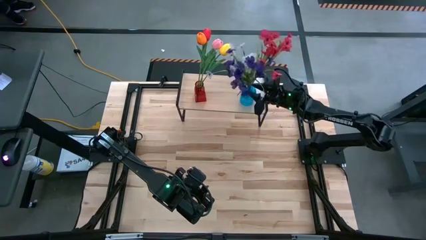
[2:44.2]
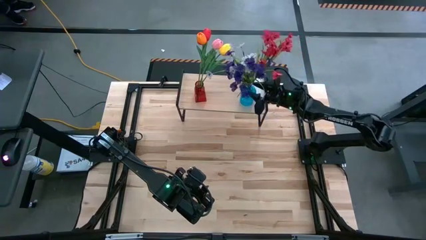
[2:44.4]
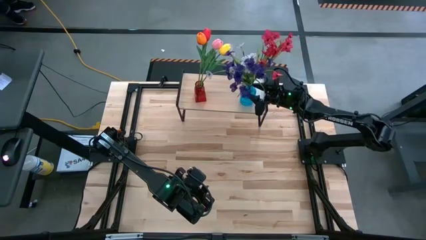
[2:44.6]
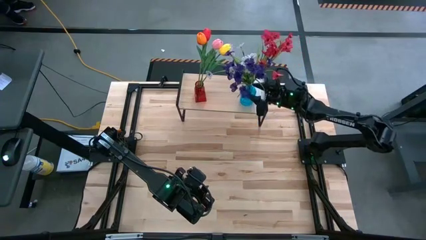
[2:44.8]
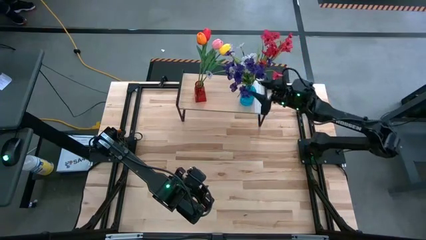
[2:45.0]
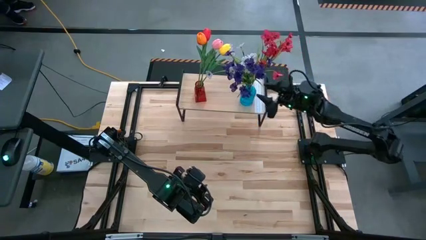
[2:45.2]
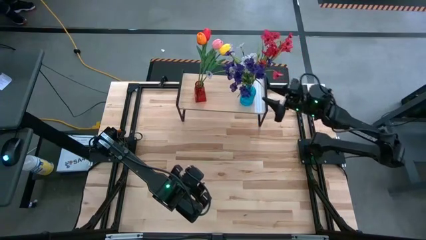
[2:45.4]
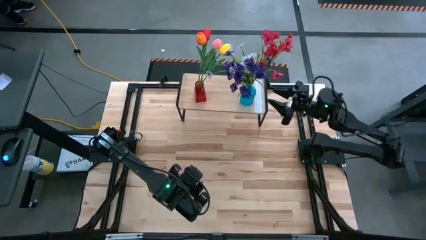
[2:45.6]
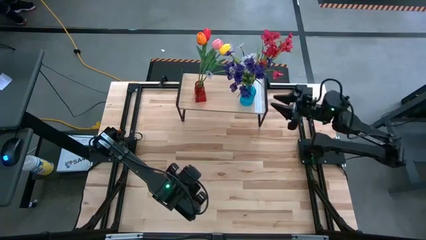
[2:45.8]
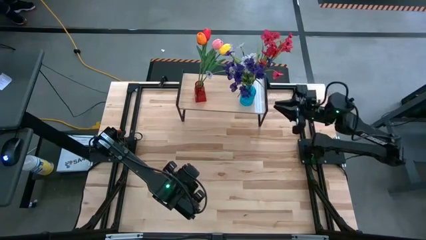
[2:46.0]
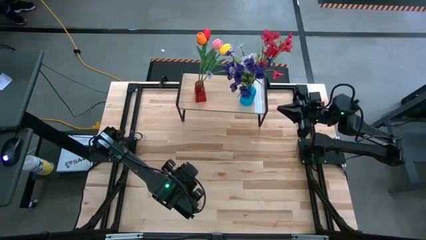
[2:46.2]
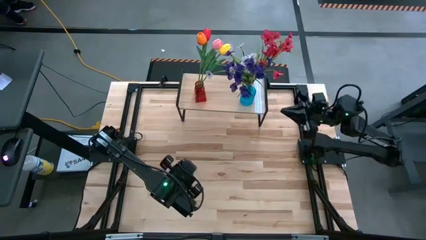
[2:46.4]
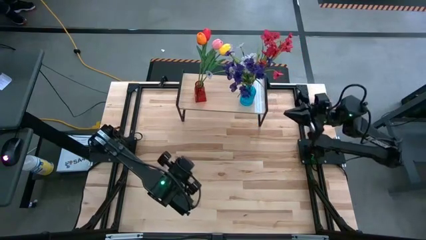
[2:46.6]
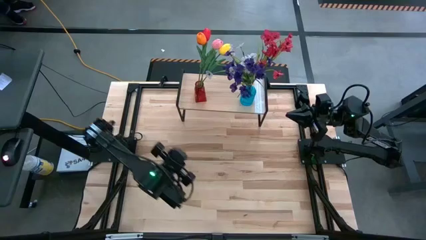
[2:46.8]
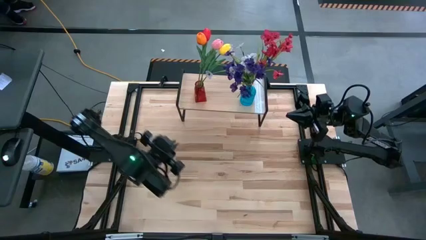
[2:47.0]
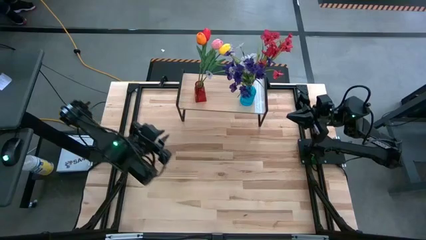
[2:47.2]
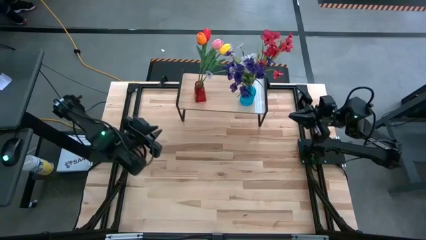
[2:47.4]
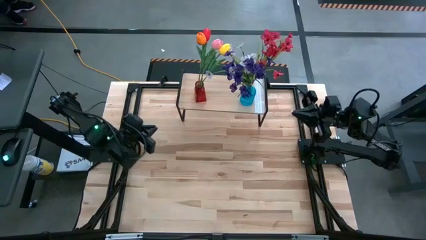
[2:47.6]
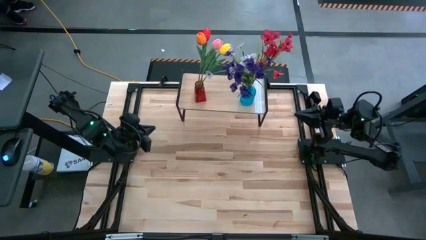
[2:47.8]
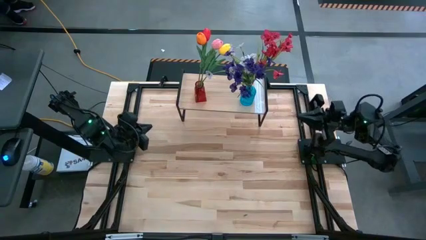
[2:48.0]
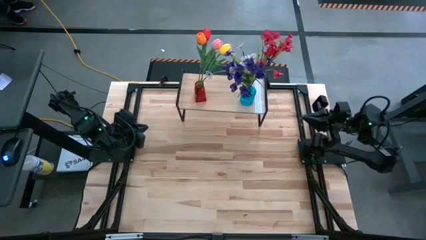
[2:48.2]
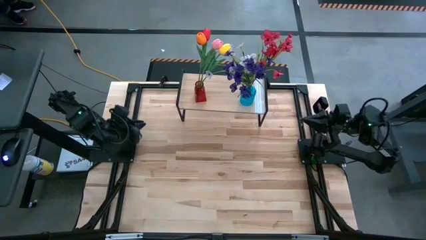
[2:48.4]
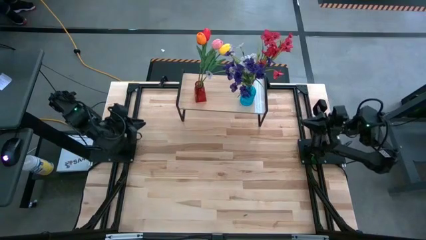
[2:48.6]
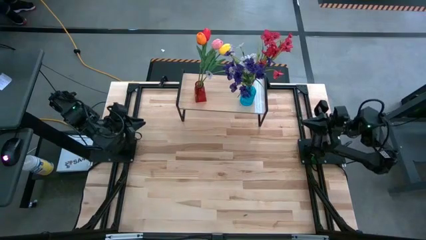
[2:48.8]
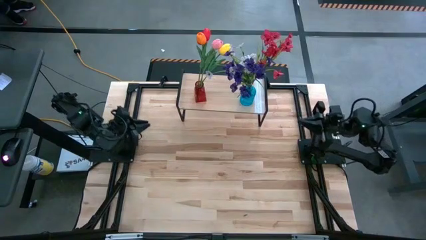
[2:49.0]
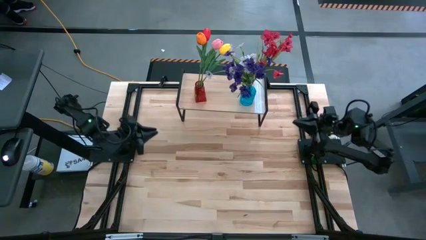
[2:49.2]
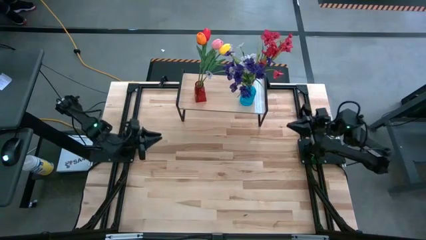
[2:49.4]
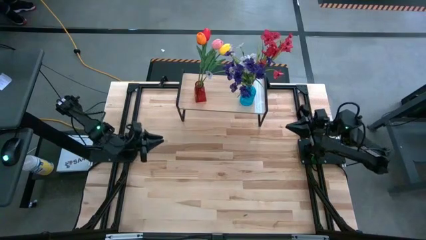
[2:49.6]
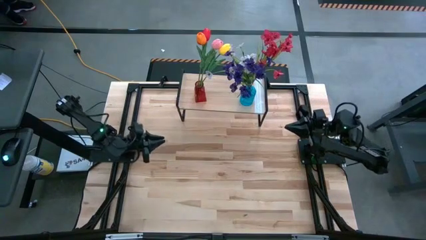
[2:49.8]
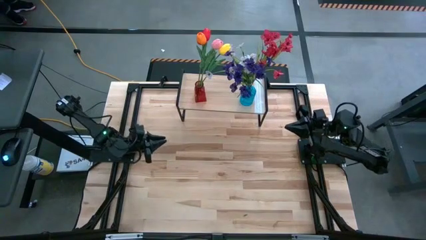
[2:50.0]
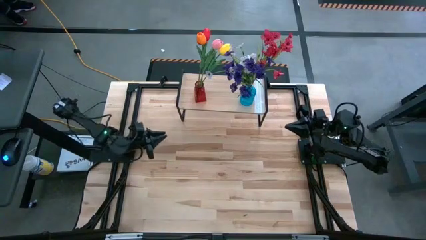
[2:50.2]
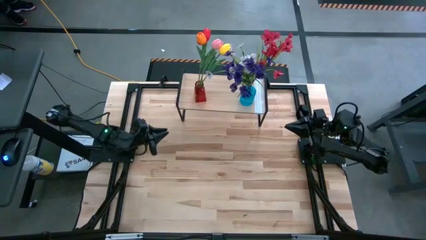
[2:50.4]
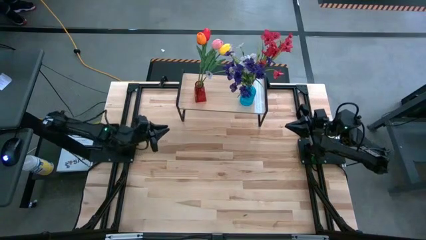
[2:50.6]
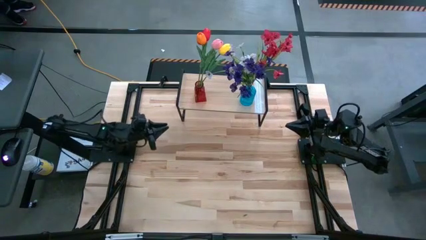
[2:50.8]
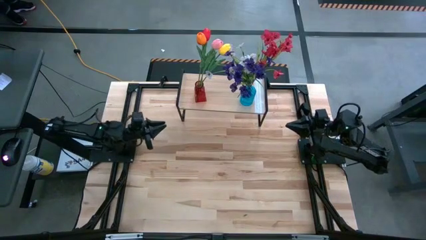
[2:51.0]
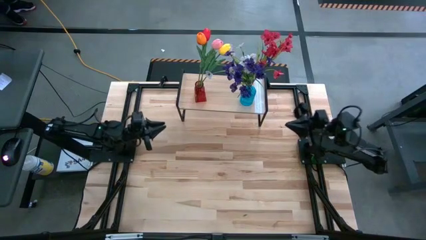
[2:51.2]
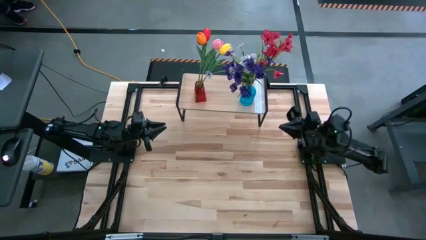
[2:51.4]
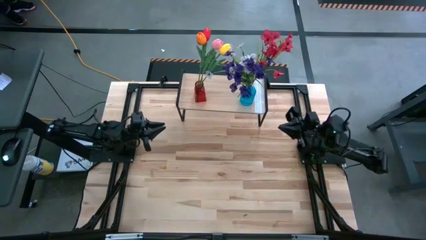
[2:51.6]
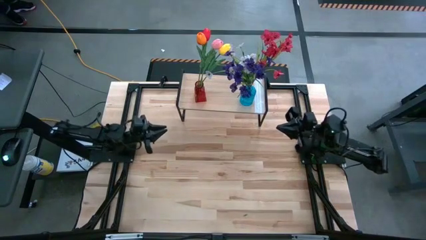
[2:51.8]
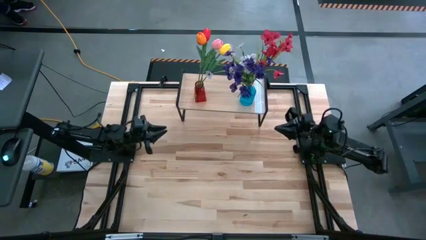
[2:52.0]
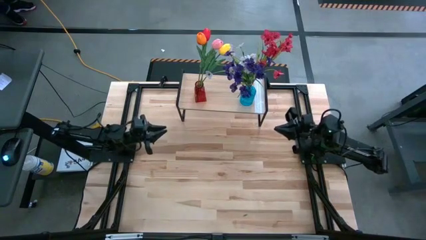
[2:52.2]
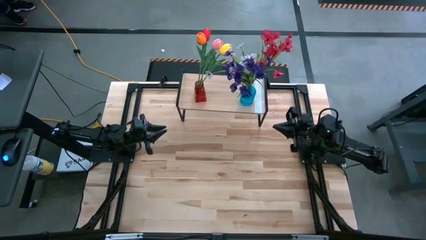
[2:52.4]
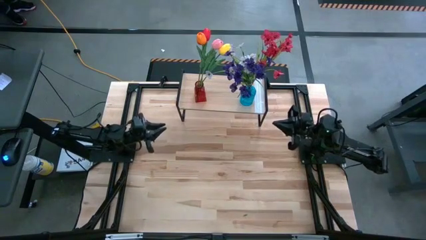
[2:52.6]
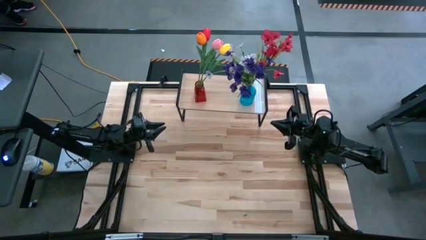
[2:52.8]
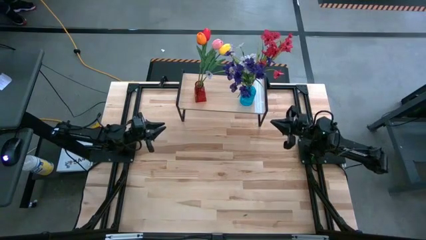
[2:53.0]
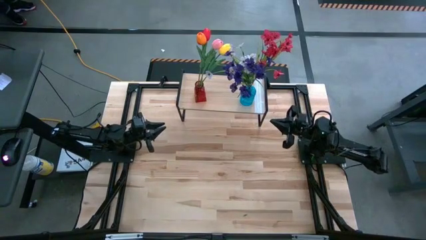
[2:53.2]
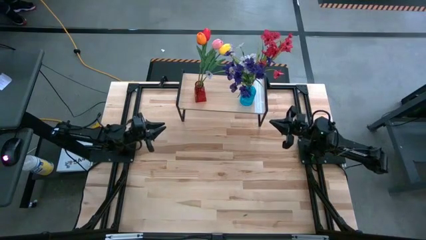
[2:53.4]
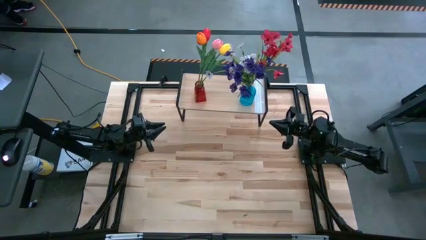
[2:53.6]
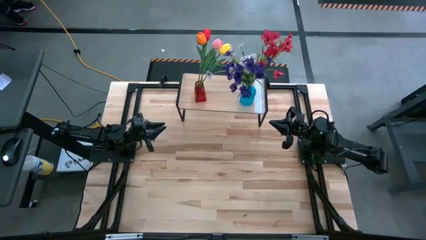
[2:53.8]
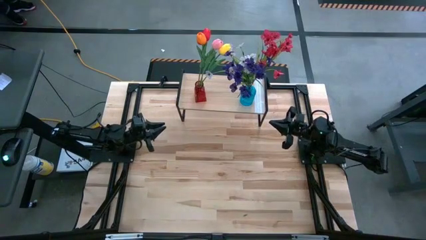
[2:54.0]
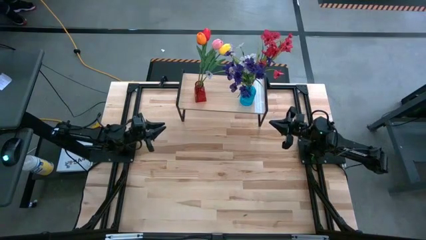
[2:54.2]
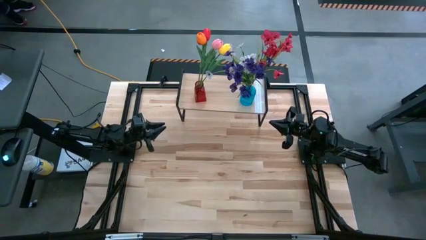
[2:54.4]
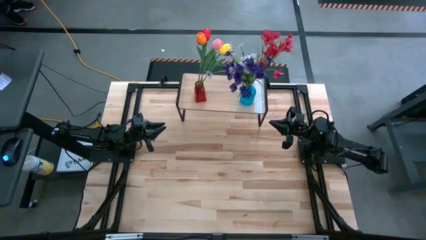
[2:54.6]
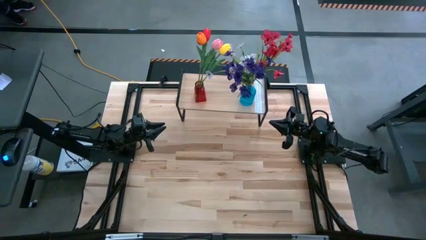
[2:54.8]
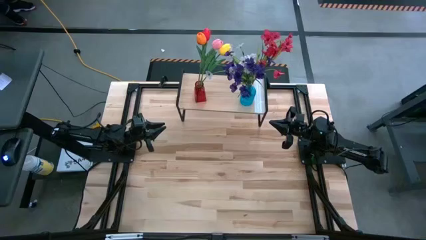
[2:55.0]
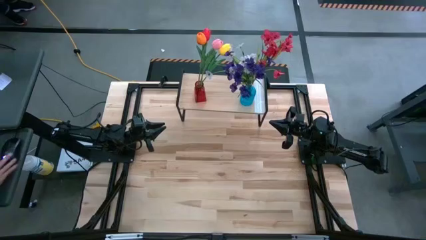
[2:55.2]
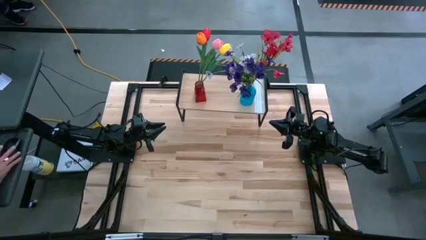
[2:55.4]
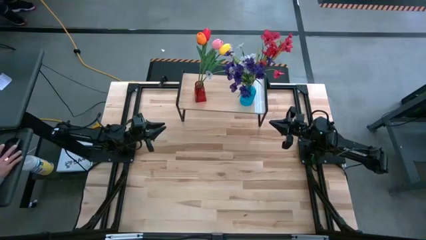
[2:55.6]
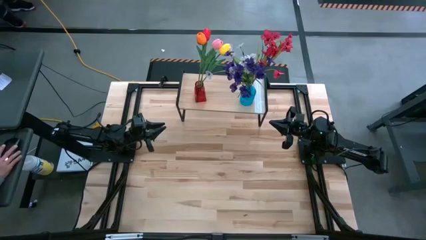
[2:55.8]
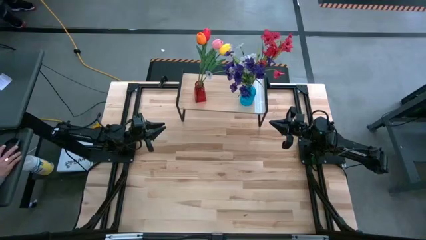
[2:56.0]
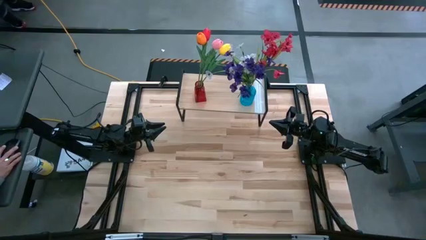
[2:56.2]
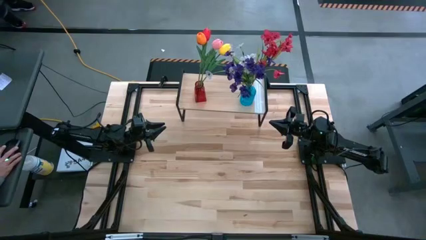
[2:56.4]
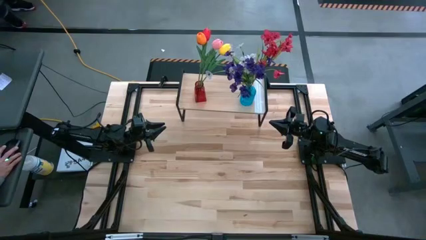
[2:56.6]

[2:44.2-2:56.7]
Task: Pick and place flowers into a vace then onto a shelf
Return to Home Position
